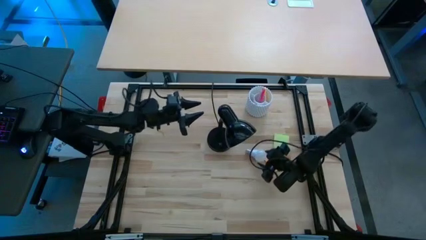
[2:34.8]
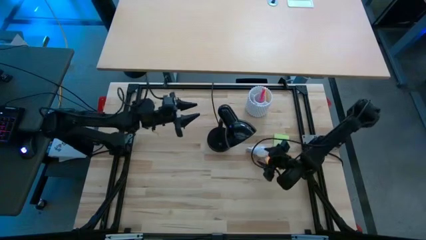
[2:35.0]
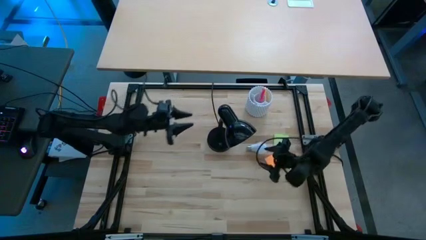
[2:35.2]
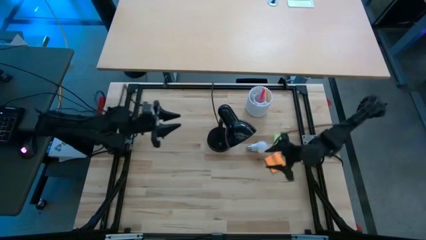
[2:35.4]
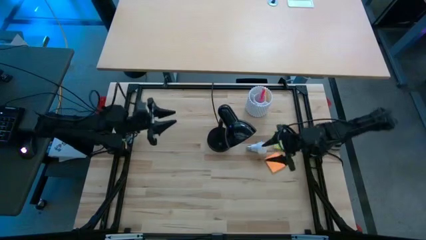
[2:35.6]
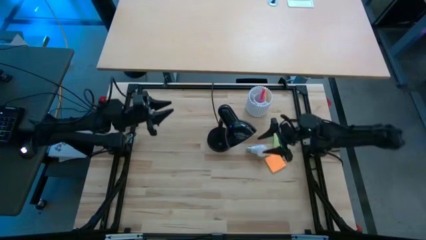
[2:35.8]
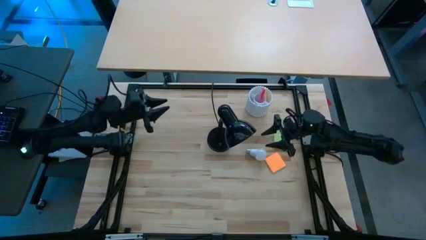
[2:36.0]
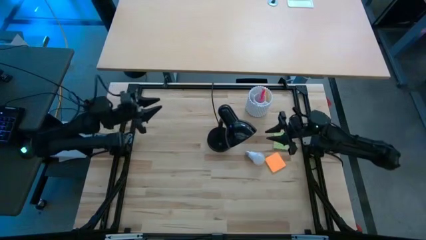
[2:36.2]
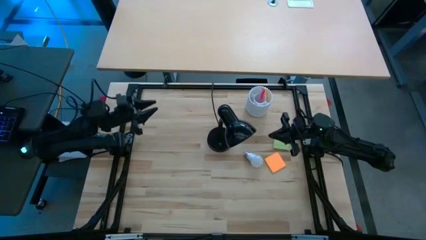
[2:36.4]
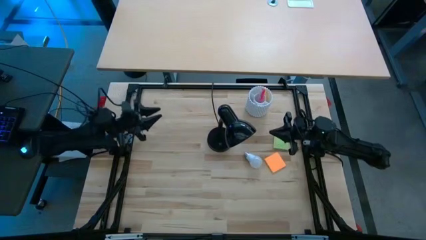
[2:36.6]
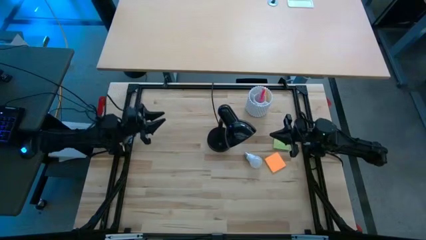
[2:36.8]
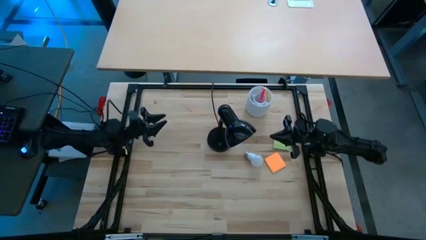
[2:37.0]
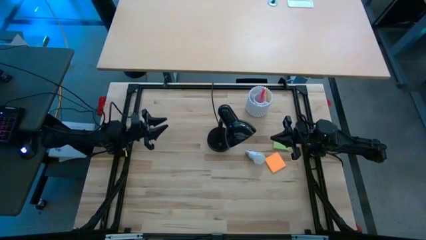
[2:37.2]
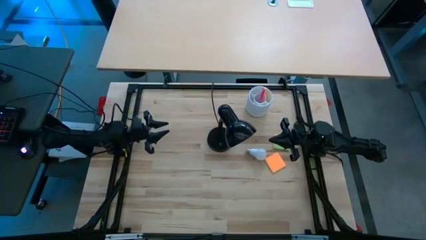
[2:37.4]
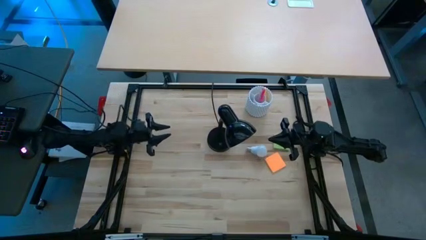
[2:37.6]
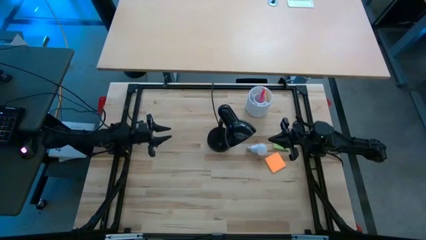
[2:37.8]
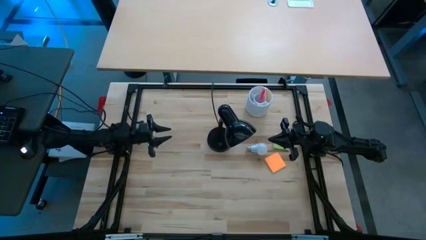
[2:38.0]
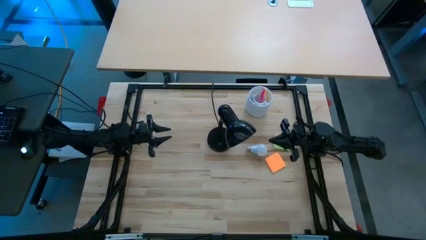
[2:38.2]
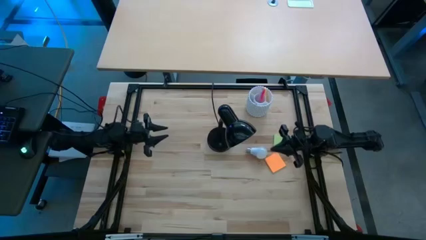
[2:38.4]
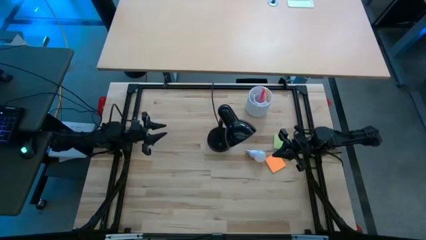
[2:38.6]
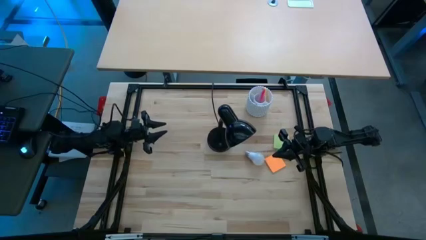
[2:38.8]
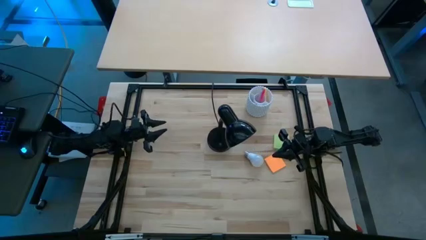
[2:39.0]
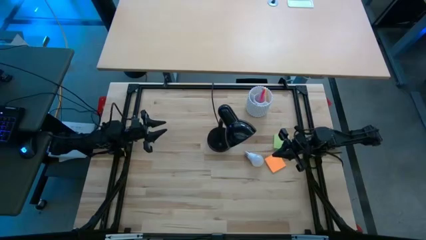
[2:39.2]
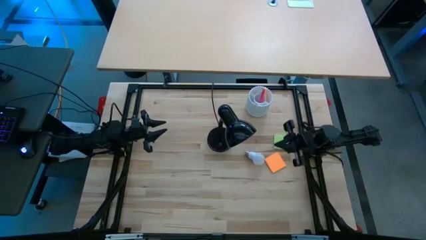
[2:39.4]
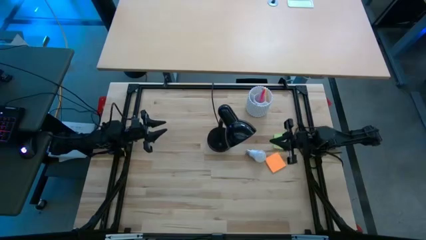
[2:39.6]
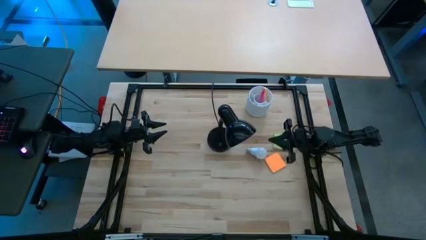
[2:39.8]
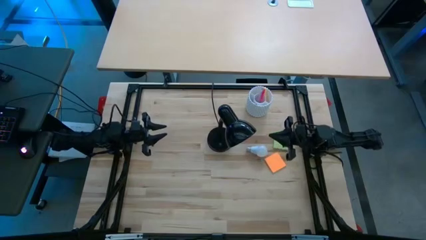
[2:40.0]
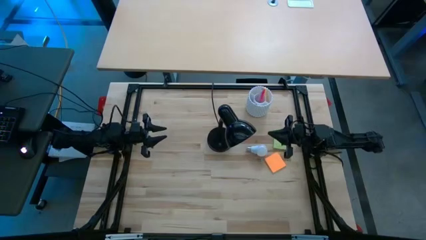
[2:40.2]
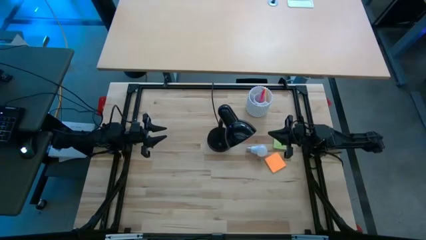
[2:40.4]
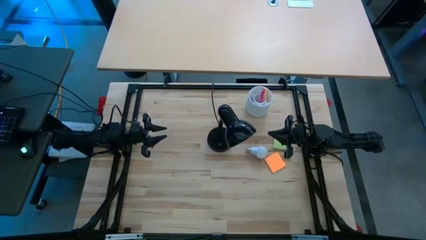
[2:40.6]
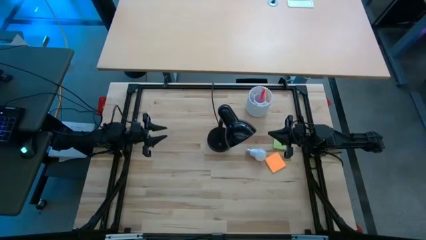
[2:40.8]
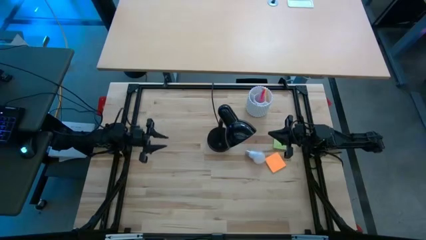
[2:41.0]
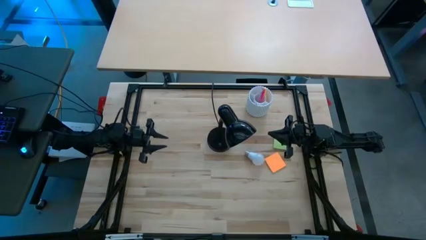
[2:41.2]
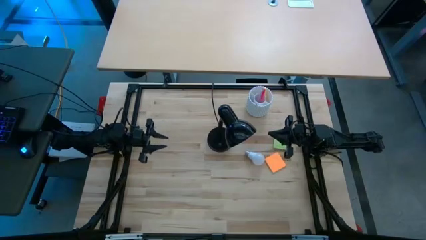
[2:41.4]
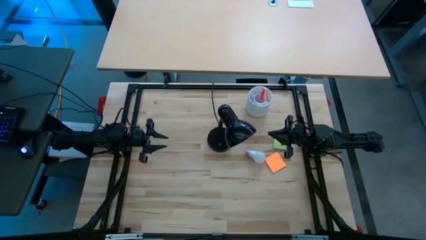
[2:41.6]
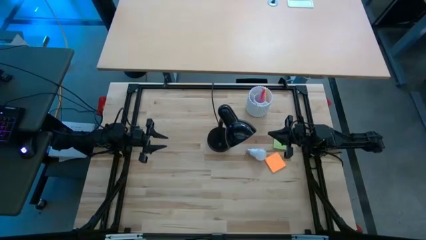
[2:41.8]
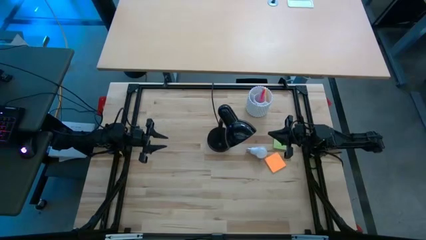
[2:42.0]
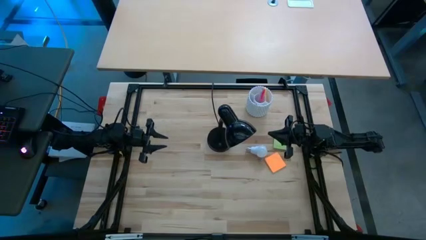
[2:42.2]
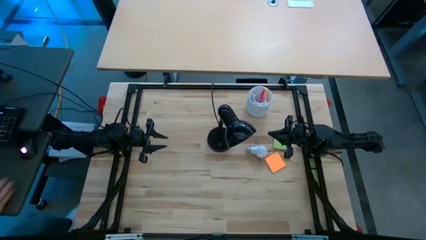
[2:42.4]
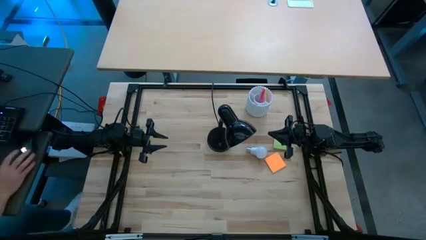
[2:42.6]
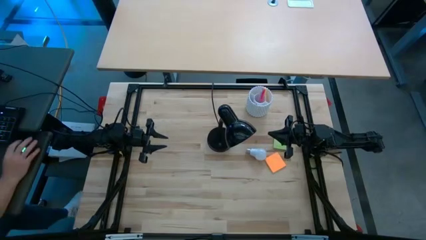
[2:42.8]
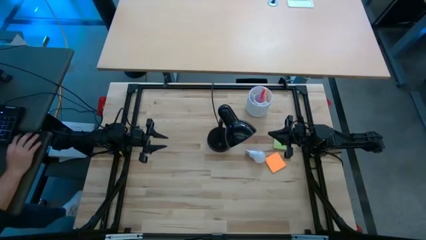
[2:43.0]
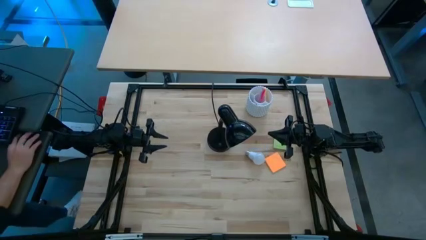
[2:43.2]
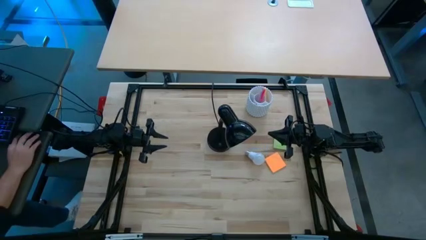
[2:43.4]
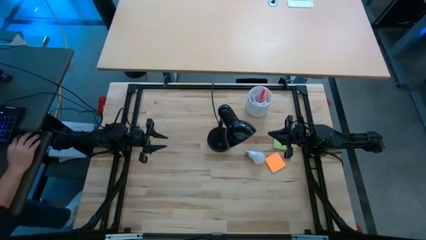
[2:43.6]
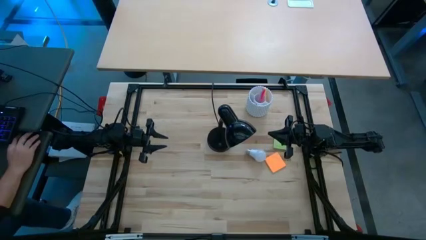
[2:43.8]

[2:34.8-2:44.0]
Task: Screw lightbulb
Return to Home Position

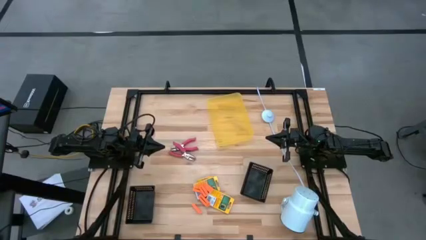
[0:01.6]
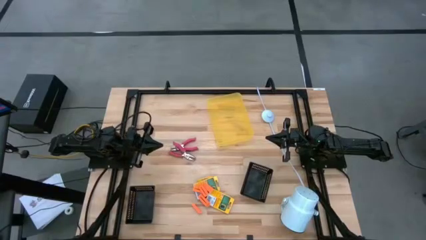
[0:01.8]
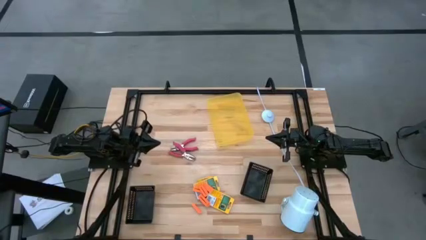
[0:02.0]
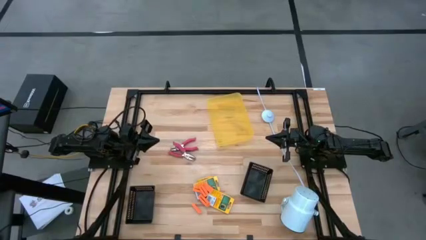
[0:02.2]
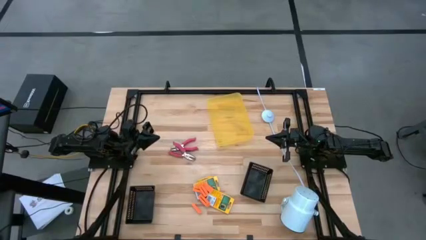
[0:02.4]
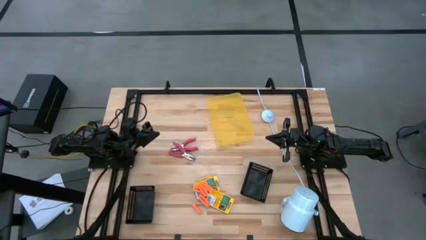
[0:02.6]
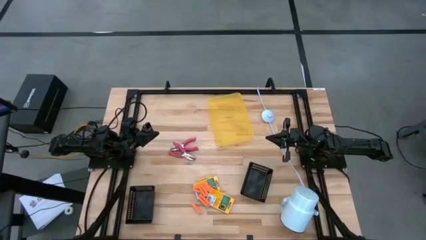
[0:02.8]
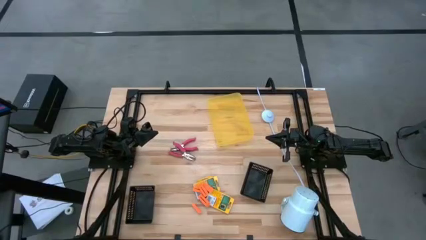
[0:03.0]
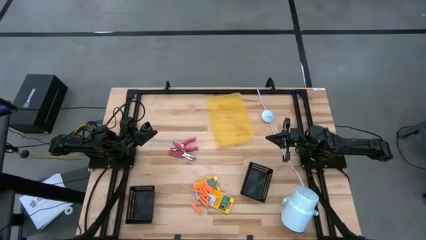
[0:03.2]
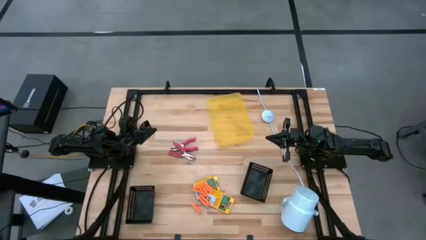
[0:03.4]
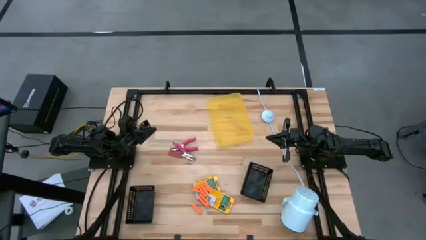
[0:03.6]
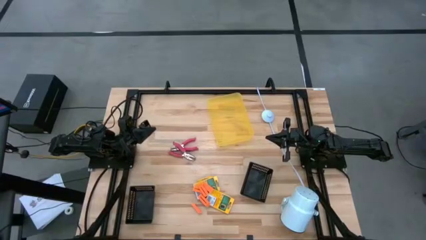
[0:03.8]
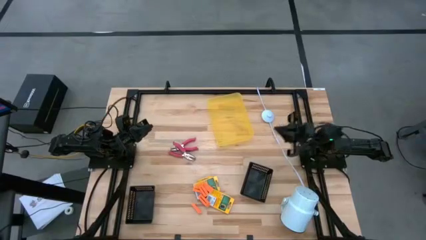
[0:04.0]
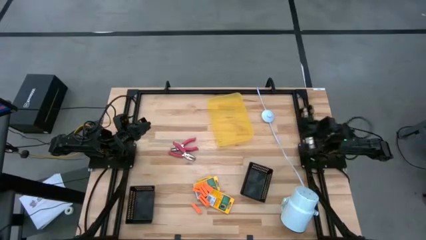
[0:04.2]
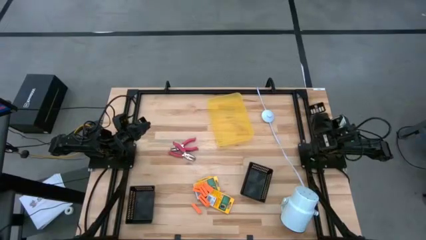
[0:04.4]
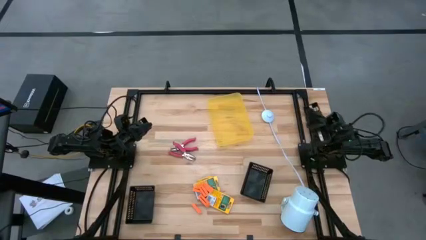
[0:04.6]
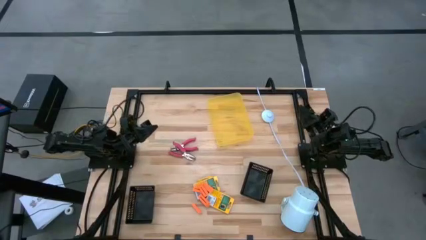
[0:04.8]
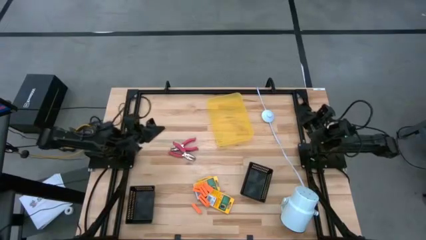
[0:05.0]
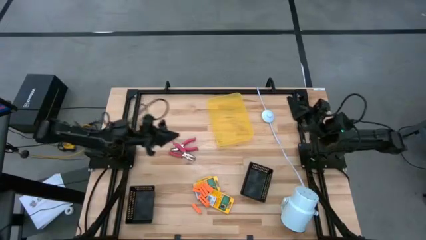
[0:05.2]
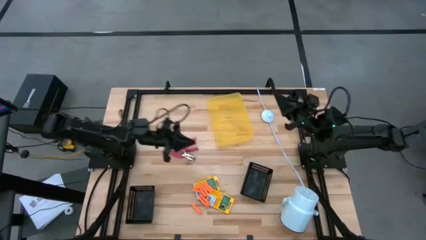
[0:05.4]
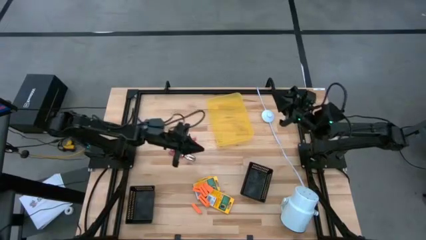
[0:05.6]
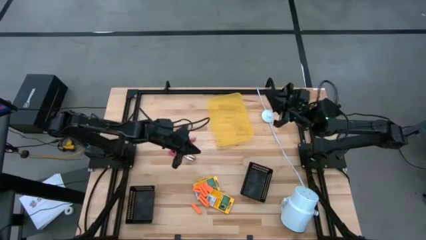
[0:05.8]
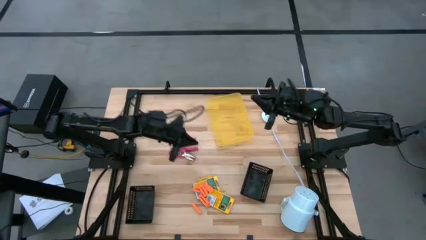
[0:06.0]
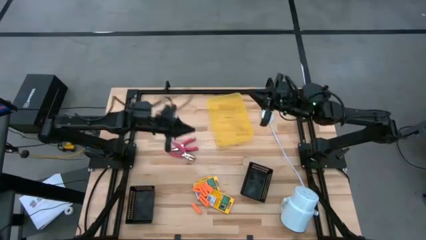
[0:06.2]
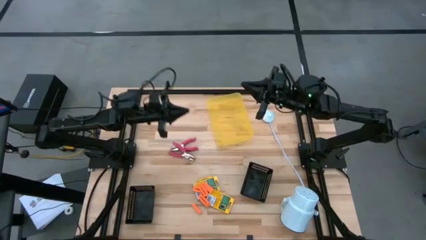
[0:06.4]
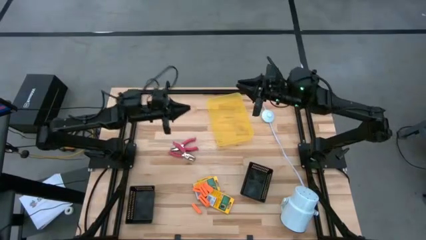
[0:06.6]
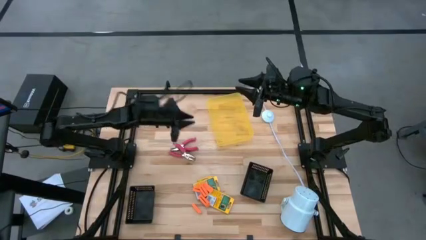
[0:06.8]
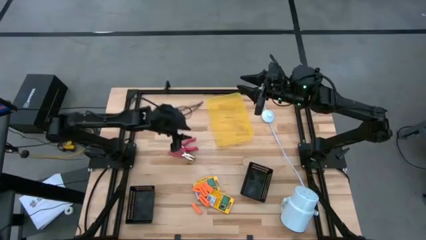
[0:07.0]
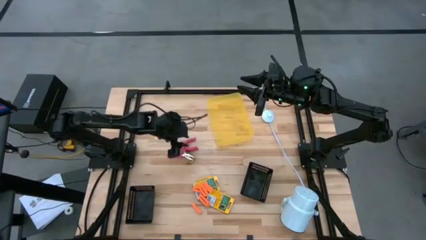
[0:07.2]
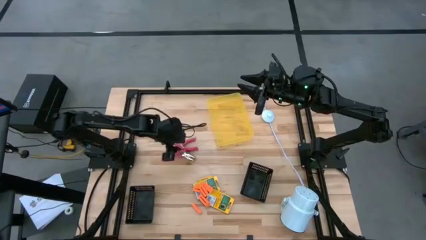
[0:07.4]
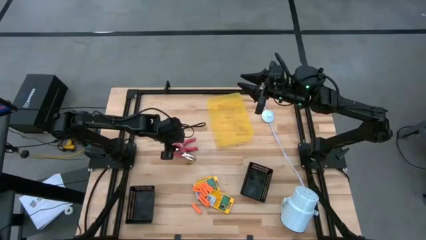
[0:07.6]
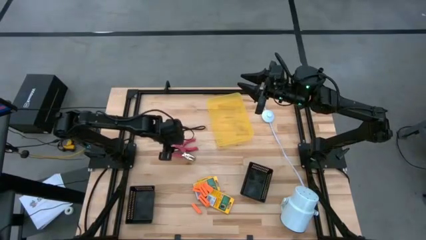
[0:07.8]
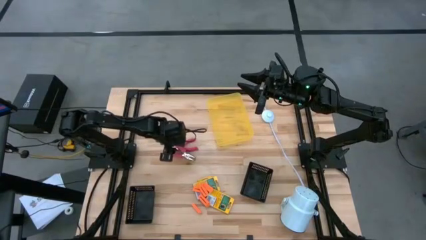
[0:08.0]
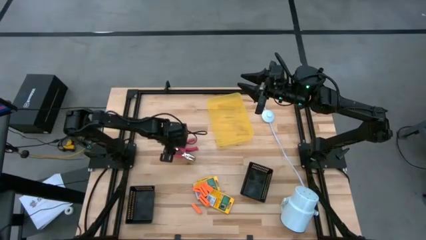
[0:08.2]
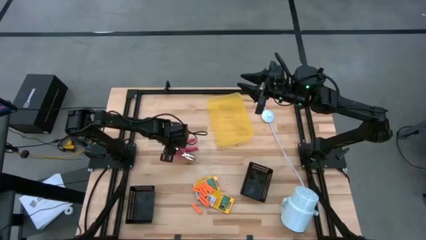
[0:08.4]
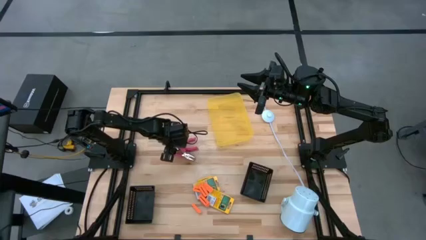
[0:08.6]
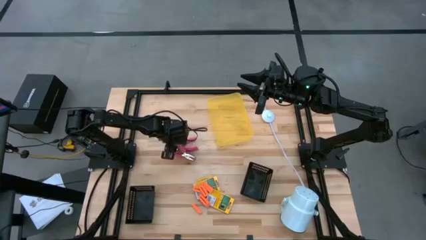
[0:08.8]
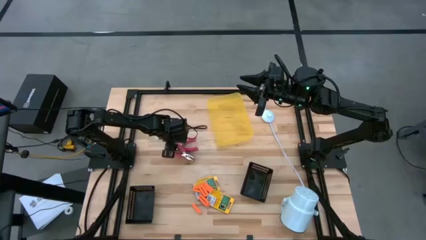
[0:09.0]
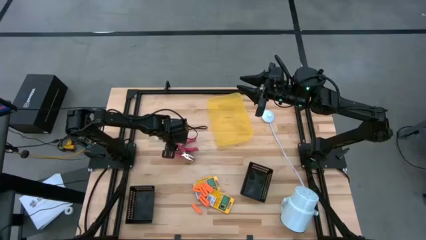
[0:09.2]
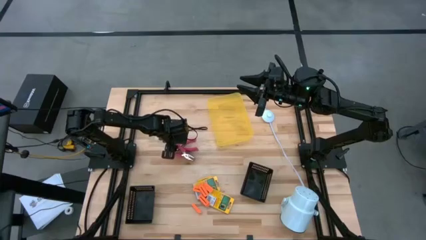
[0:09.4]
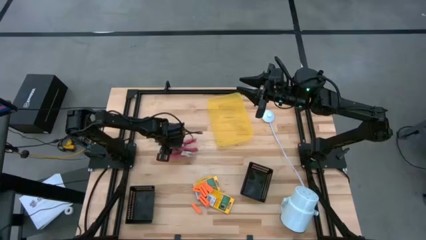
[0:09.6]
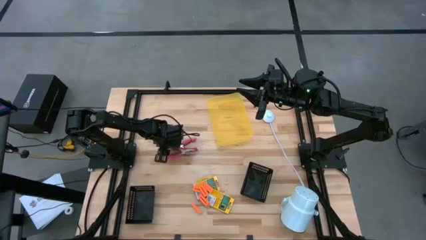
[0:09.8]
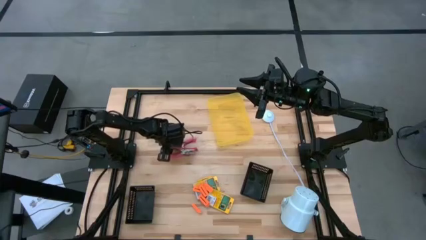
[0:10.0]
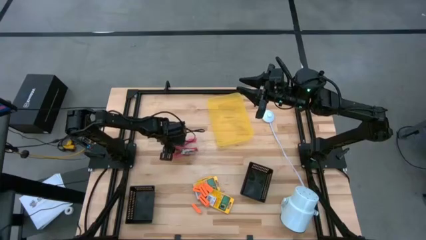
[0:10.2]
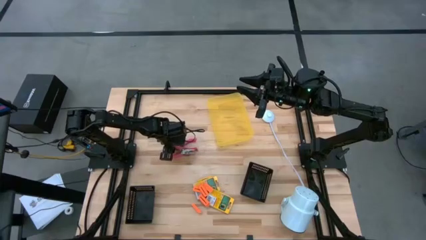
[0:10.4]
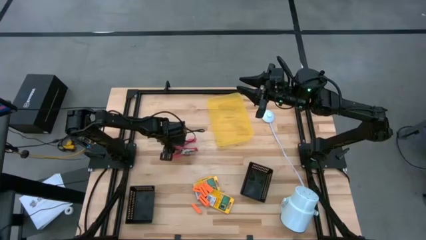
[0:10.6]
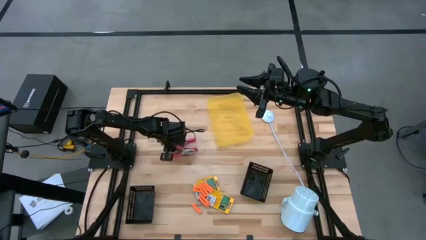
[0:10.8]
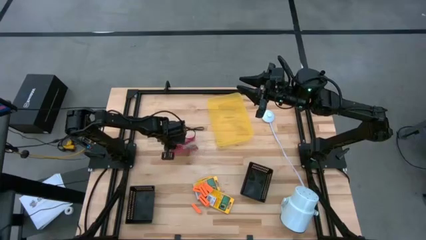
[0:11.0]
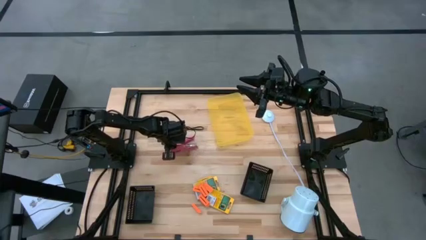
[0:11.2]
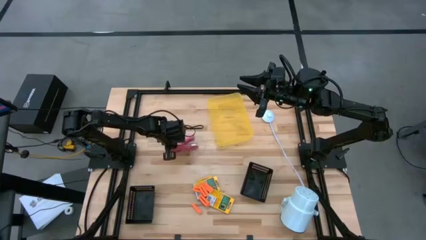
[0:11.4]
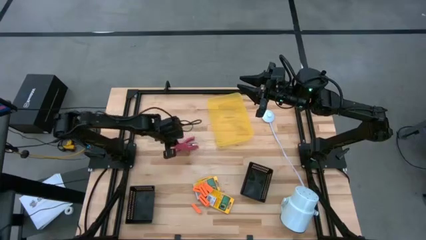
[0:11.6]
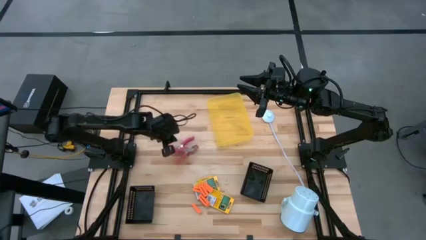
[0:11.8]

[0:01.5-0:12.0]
Task: Pick & Place School Supplies
Put the pink puncher into the left black bin
